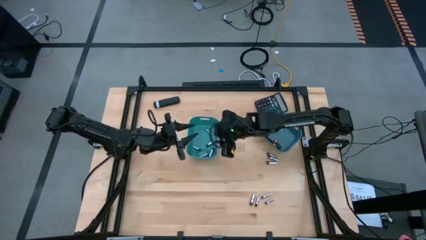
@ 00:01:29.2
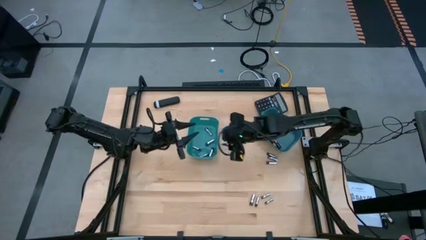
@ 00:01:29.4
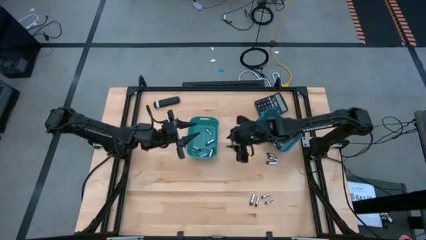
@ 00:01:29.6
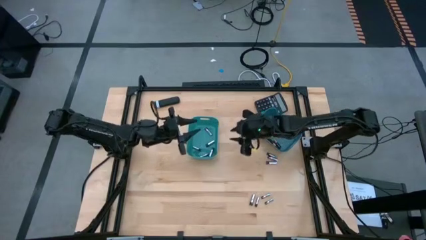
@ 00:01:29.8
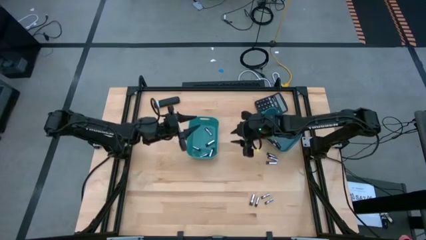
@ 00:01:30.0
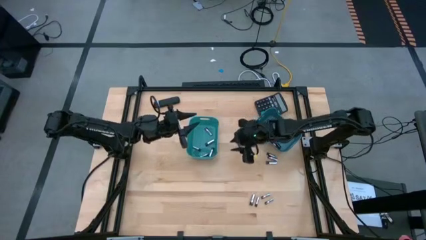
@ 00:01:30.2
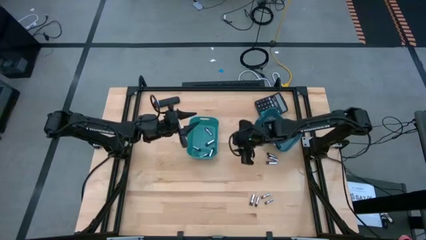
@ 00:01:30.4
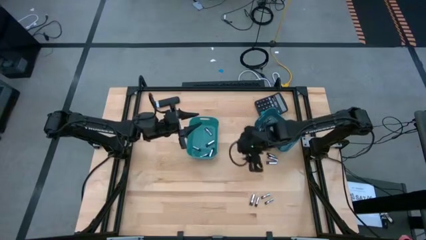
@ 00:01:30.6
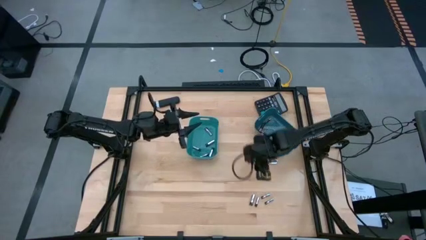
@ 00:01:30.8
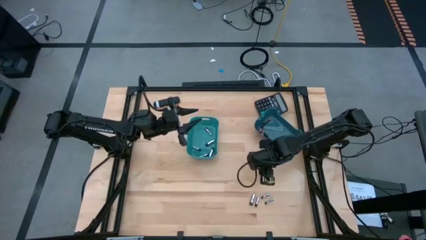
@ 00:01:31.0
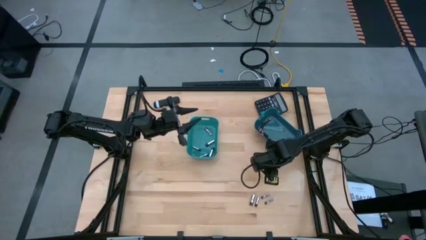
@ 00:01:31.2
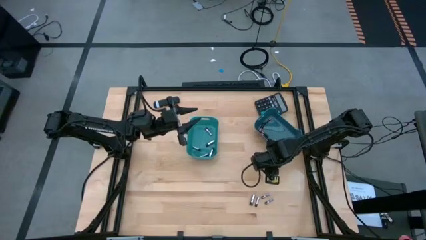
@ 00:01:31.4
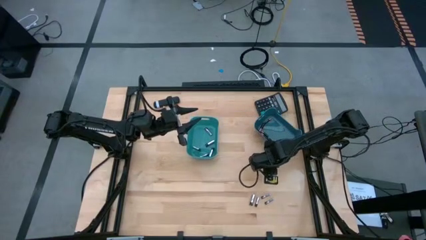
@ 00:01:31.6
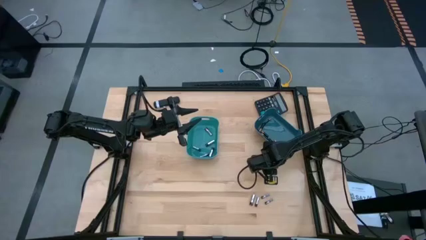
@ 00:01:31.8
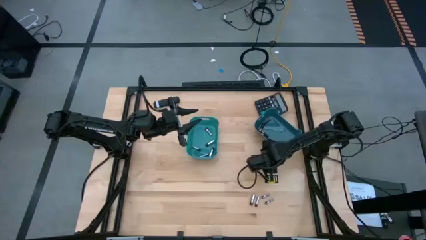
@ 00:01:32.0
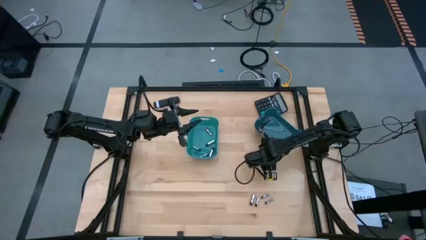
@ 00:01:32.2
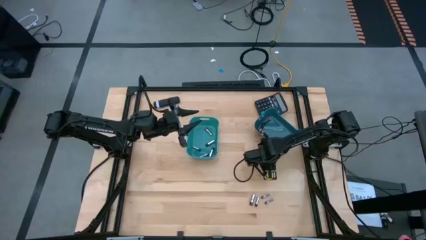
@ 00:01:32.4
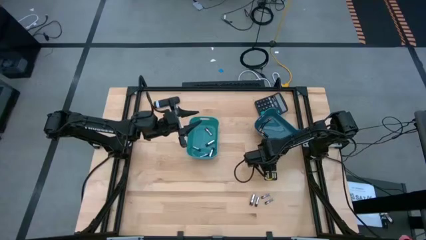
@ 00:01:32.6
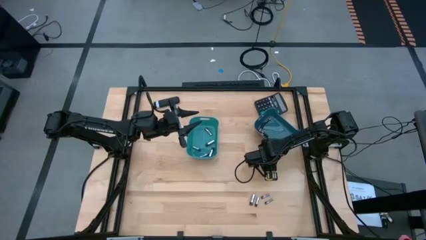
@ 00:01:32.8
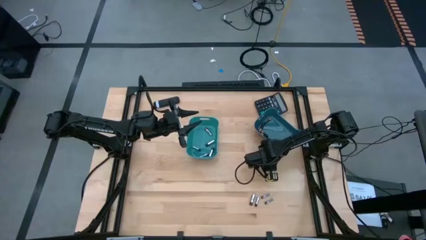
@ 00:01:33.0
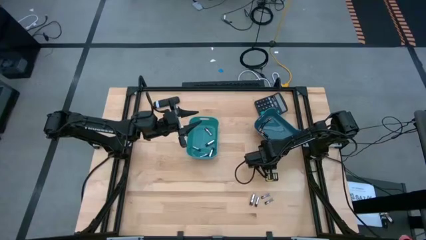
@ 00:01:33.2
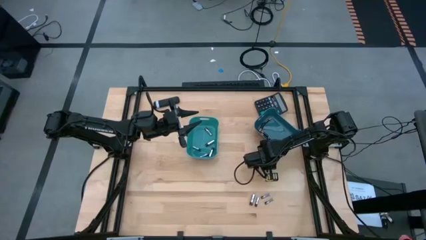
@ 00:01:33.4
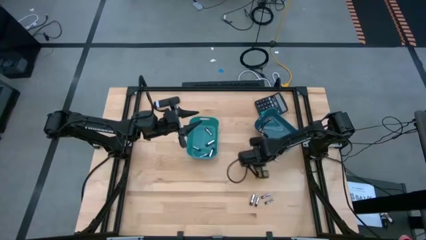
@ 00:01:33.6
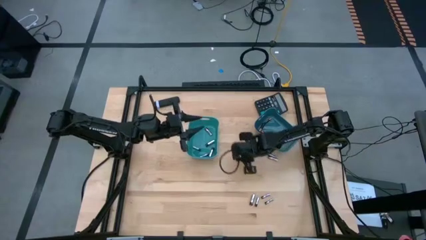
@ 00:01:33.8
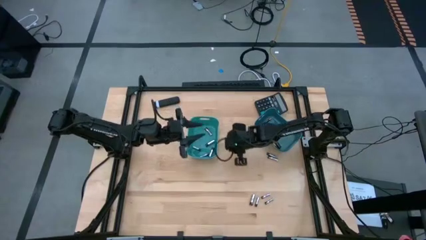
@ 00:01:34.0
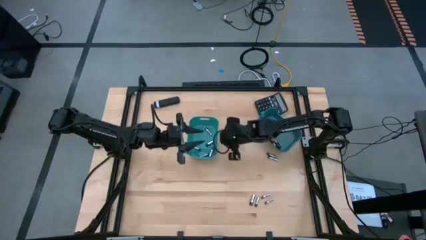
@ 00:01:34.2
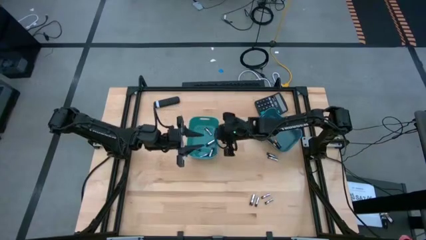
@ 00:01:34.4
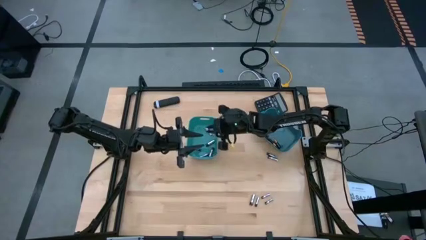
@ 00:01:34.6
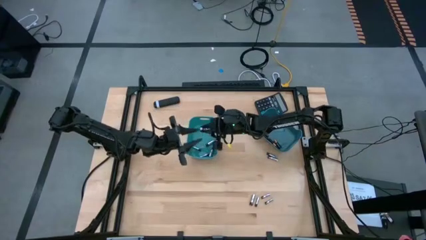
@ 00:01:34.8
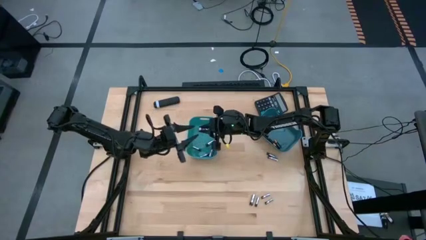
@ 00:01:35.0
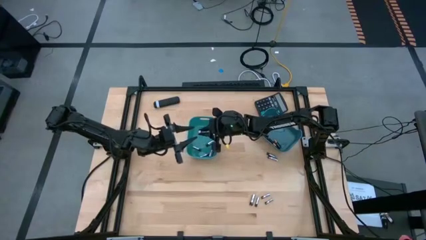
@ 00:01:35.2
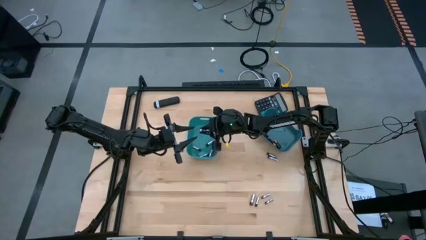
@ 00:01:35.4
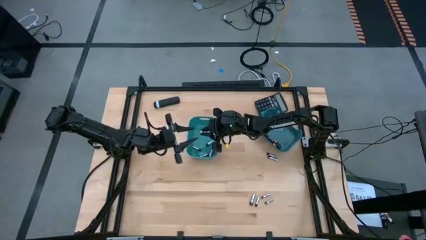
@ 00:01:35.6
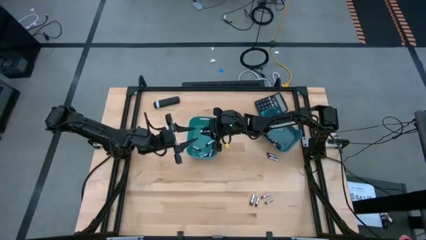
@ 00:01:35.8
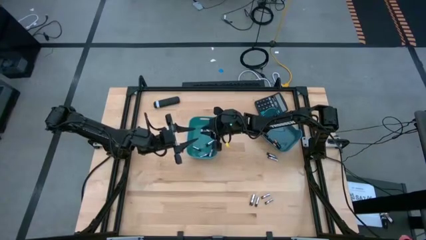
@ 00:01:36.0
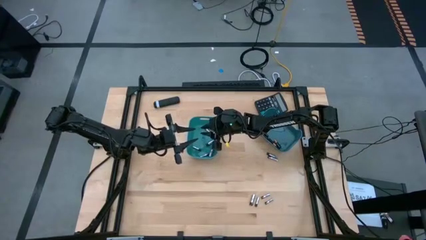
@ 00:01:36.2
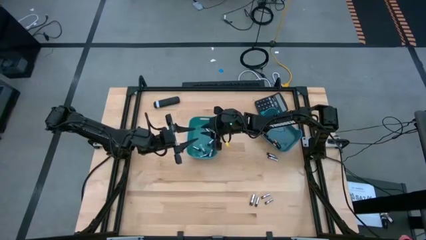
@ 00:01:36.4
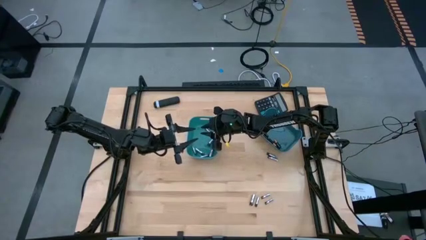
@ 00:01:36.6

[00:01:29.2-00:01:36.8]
Task: Sort batteries
Put the silver battery into the green bin

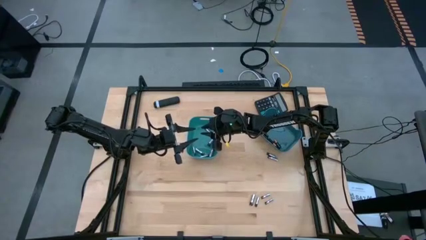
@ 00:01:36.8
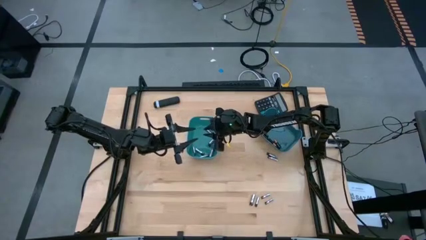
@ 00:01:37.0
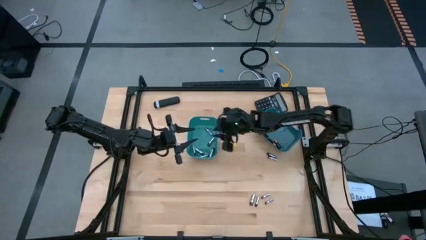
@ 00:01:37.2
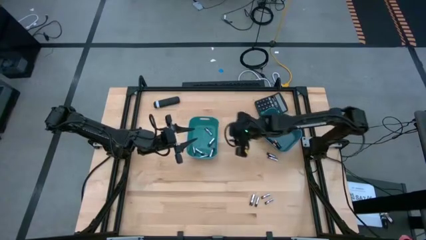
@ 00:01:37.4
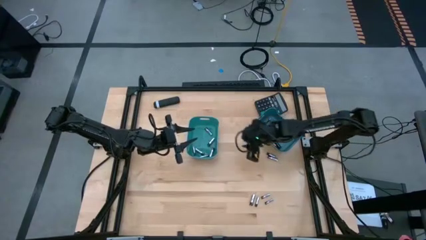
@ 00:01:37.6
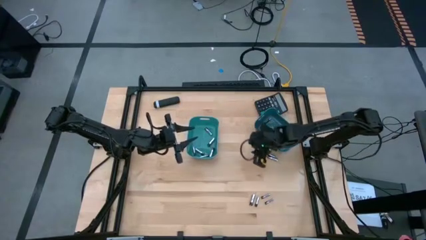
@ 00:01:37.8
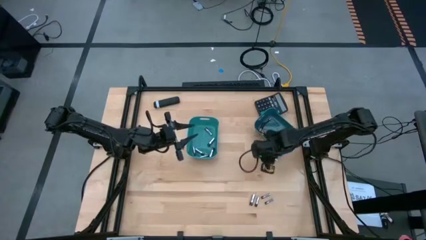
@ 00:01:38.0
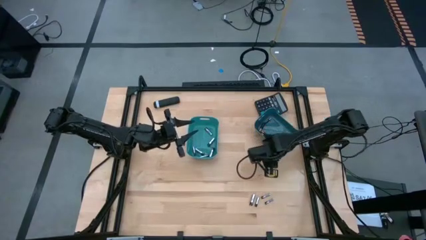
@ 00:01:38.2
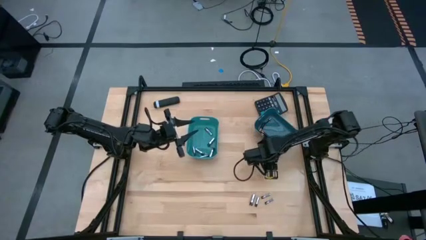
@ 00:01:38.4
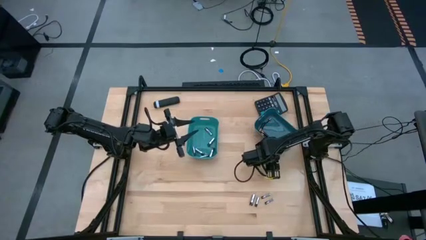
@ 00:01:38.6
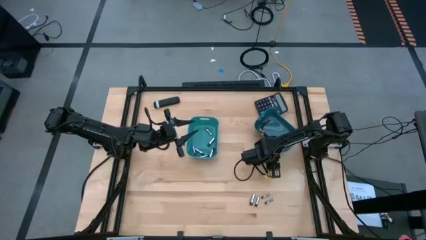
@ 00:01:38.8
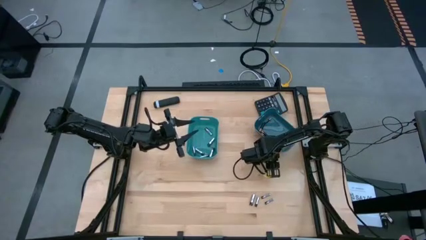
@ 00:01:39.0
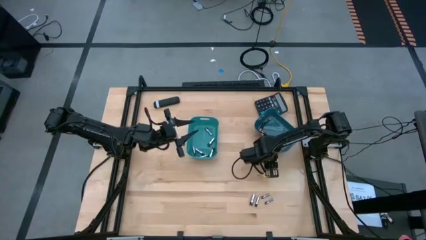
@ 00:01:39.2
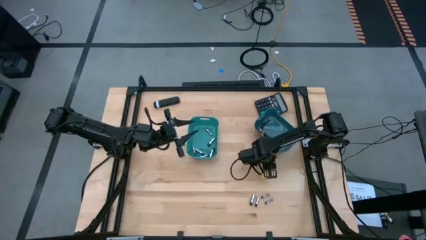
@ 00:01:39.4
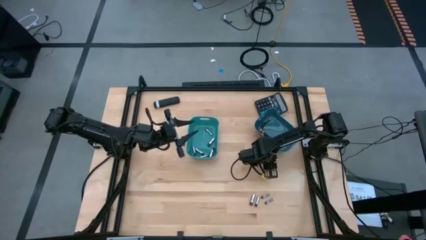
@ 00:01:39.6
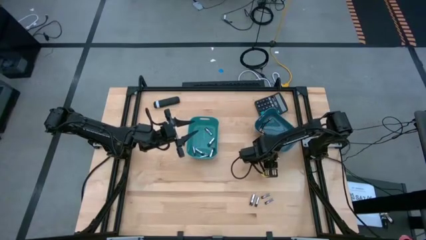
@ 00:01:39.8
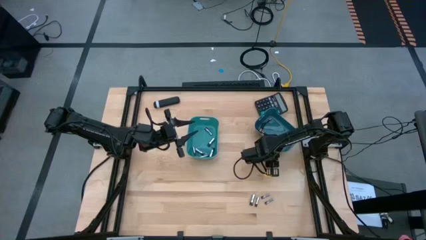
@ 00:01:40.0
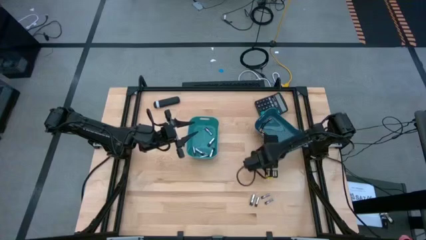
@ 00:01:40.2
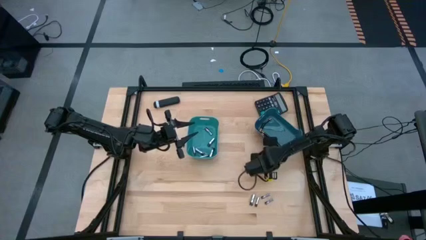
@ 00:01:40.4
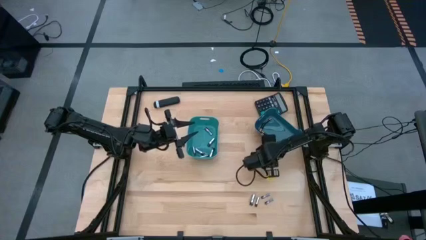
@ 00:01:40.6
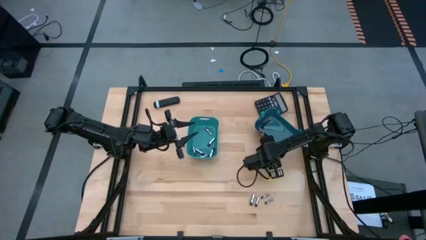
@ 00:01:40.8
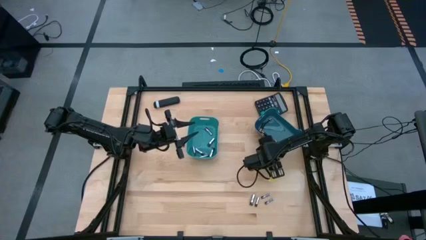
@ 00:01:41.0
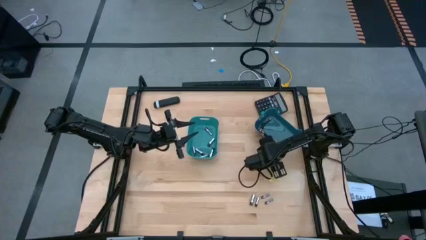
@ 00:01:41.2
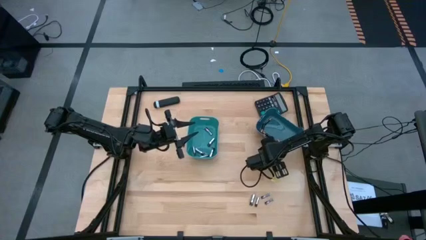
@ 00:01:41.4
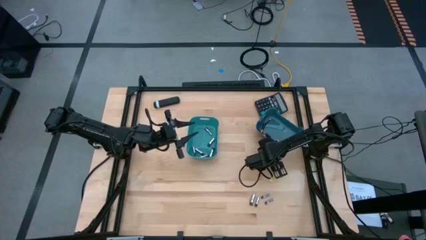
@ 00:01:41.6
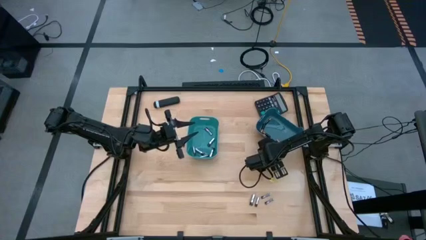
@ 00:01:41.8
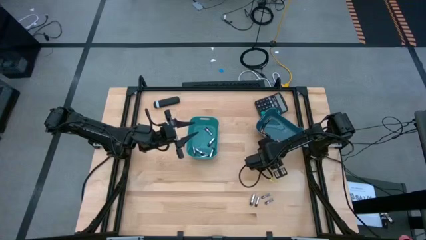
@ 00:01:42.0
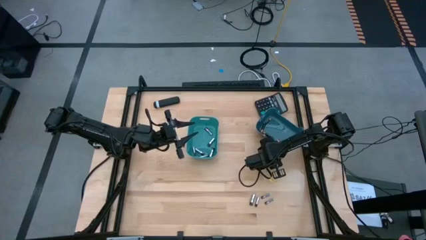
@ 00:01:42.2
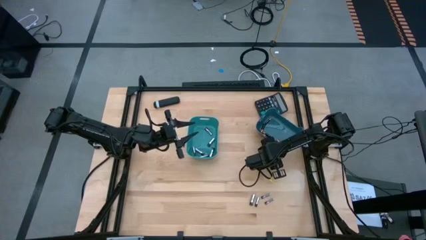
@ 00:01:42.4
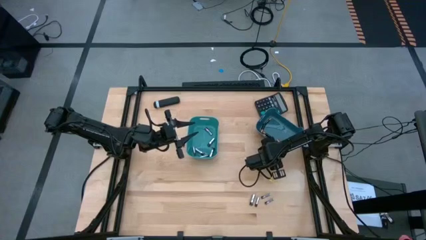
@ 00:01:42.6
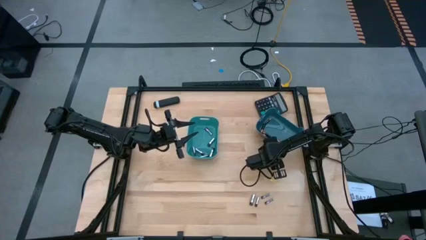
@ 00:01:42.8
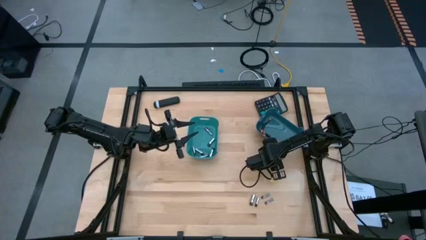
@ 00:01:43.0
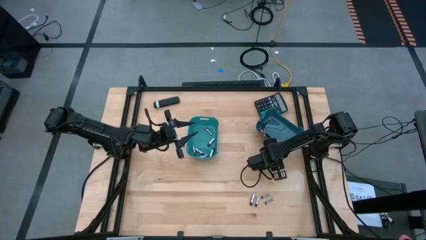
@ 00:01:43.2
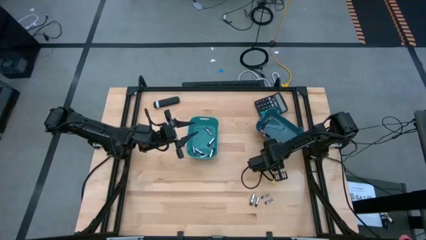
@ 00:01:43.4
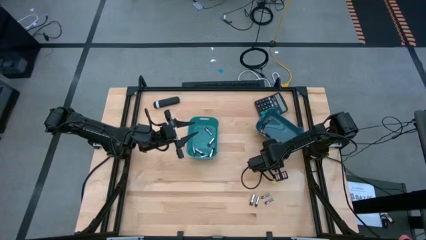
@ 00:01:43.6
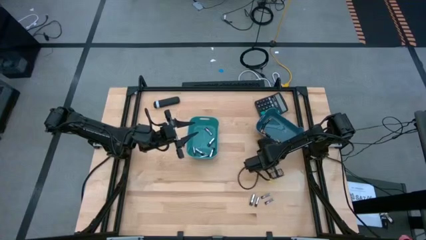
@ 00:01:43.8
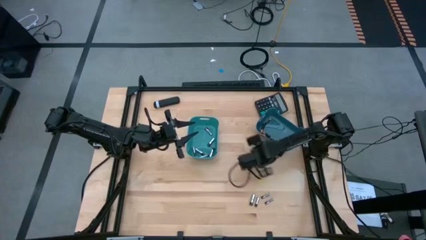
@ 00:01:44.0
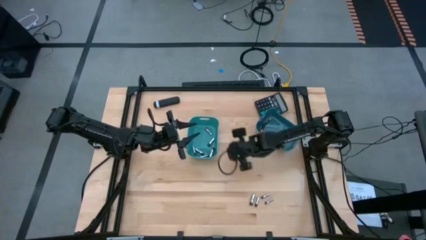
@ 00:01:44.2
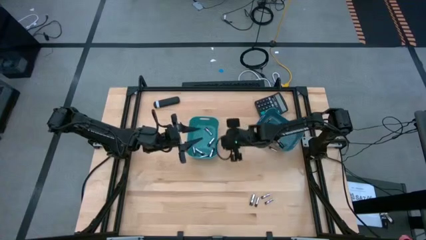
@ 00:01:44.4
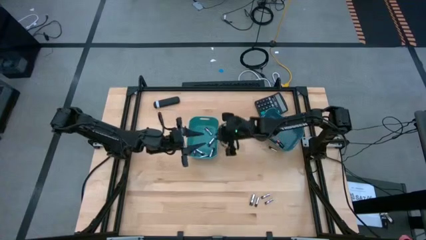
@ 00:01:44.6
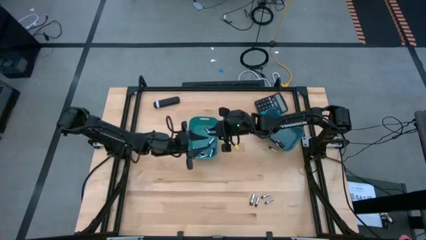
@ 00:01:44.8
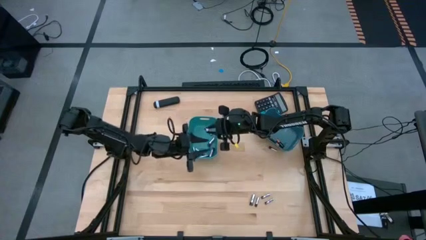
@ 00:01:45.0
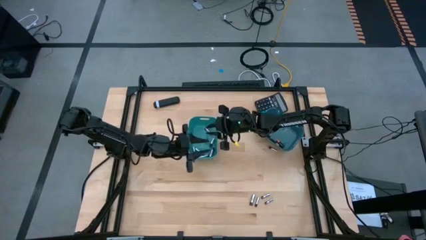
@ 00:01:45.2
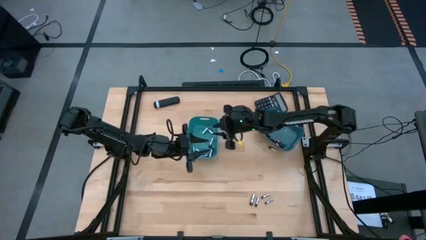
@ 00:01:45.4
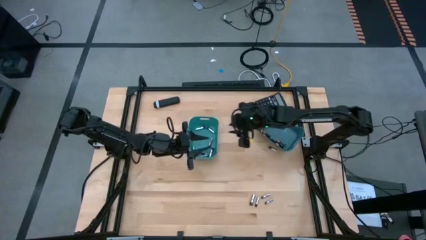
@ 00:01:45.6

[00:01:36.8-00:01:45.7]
Put the silver battery into the green bin
